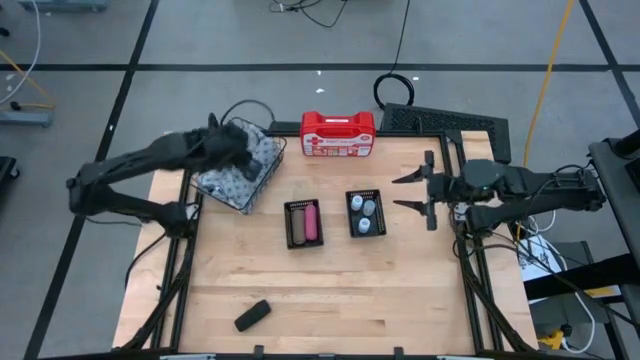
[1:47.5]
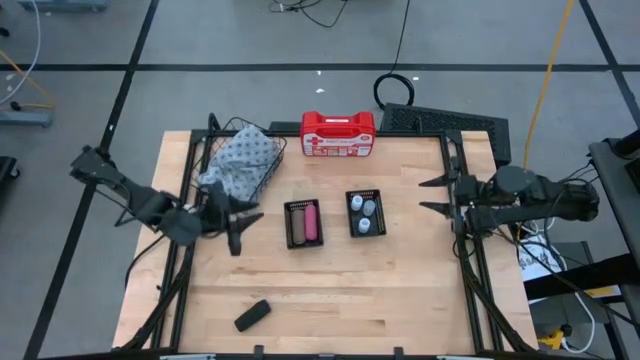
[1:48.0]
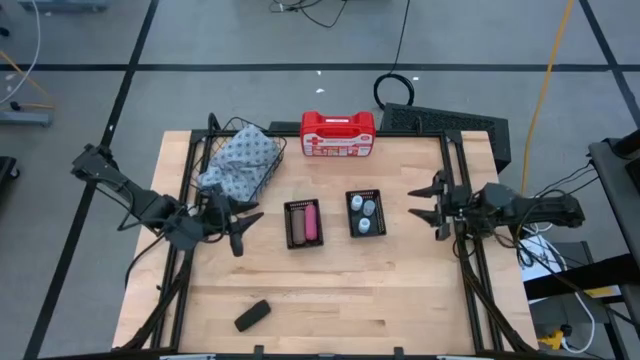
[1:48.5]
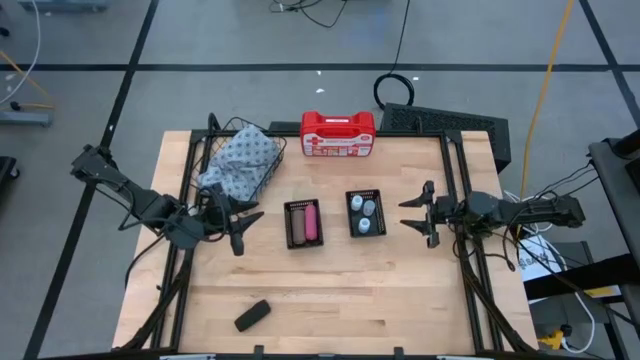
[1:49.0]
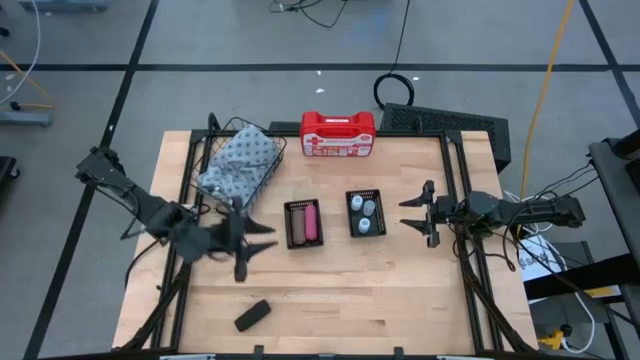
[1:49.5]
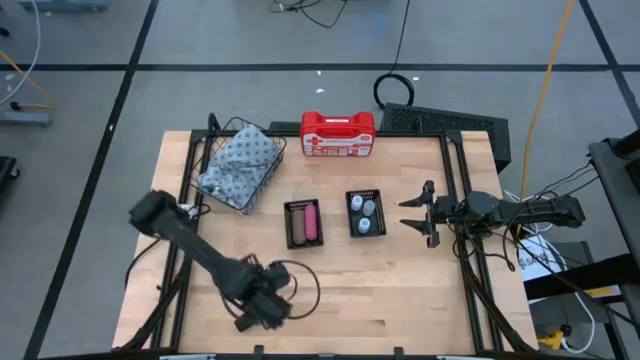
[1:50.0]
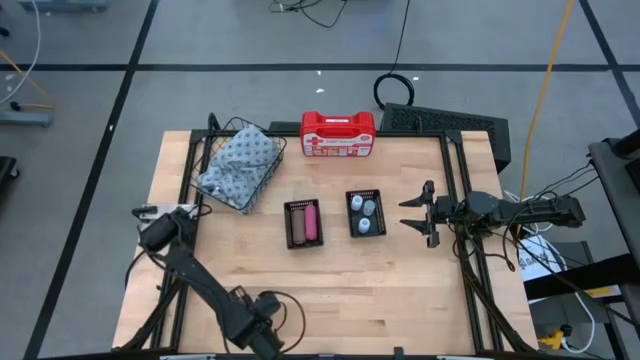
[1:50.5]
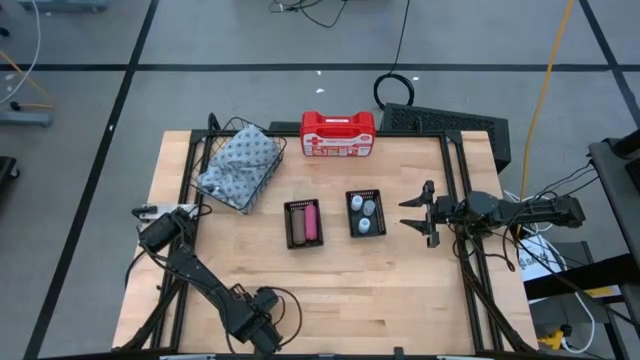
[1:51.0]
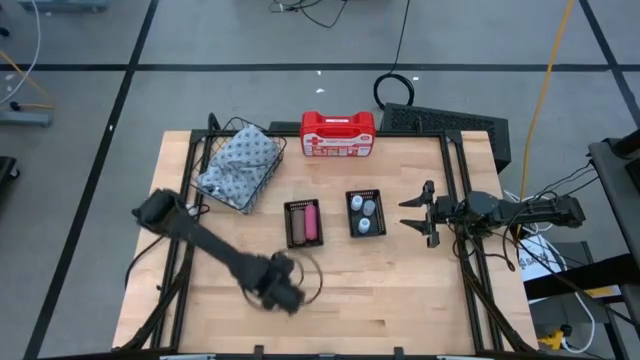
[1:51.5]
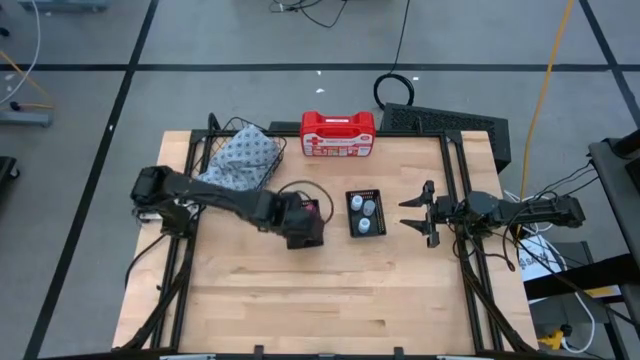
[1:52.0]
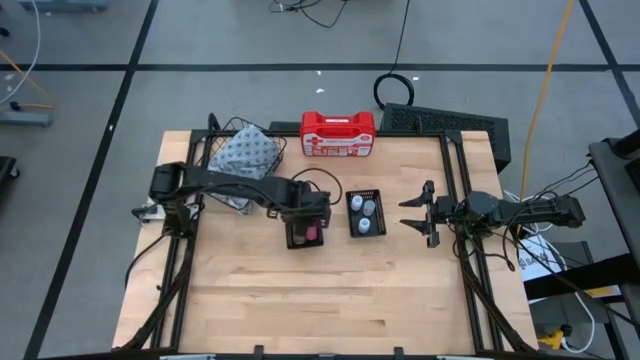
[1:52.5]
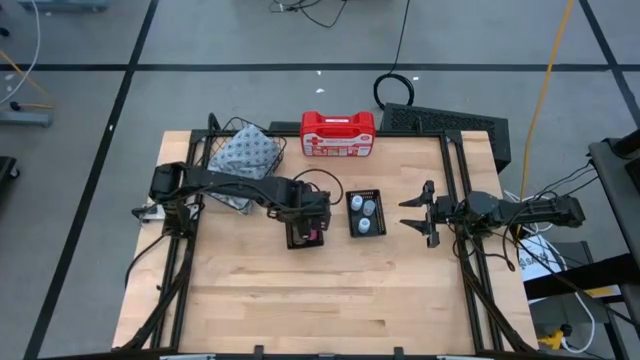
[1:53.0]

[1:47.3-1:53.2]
Task: Pick & Place Medicine items
Put the black bandage into the left black basket

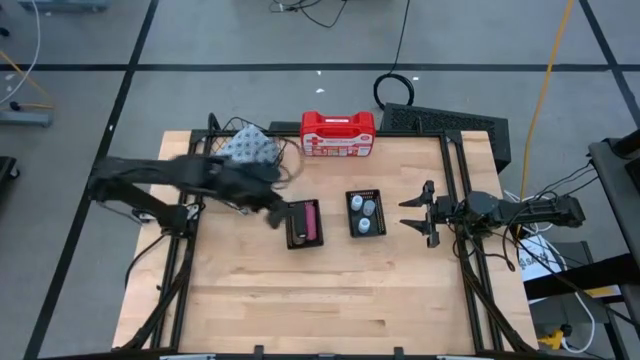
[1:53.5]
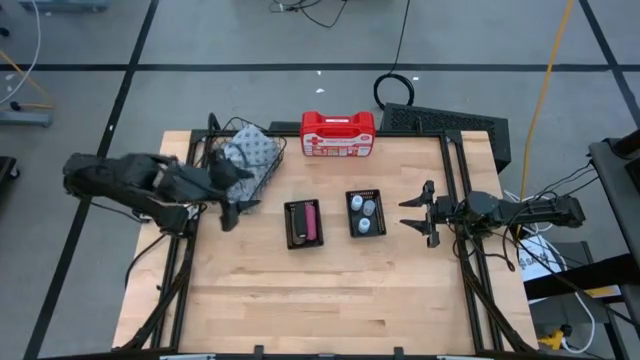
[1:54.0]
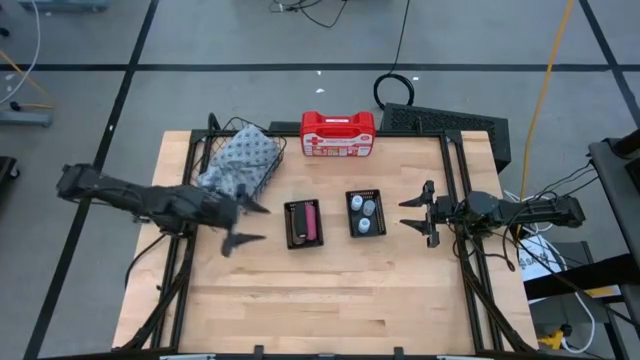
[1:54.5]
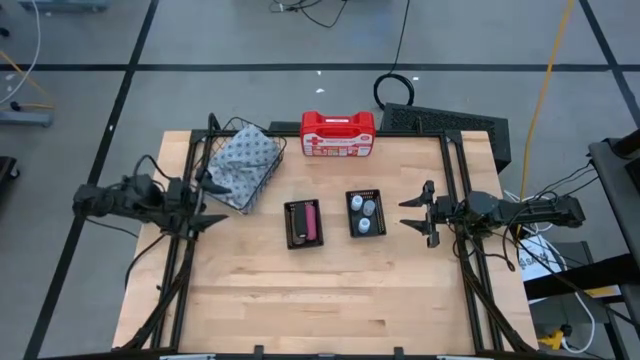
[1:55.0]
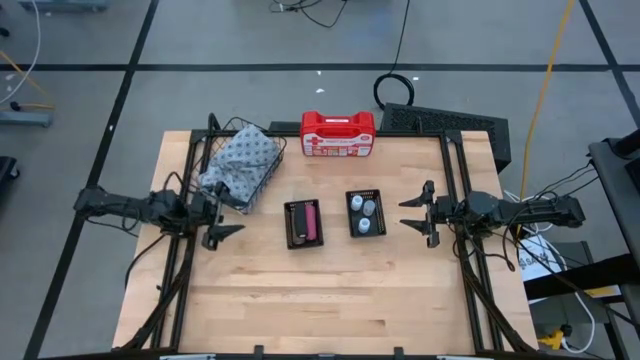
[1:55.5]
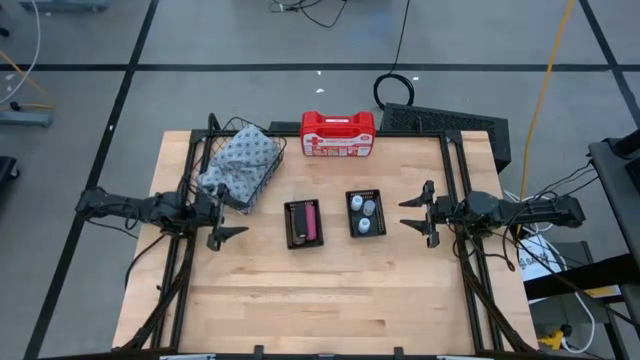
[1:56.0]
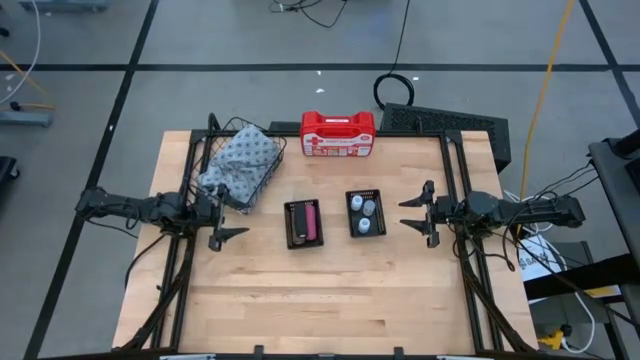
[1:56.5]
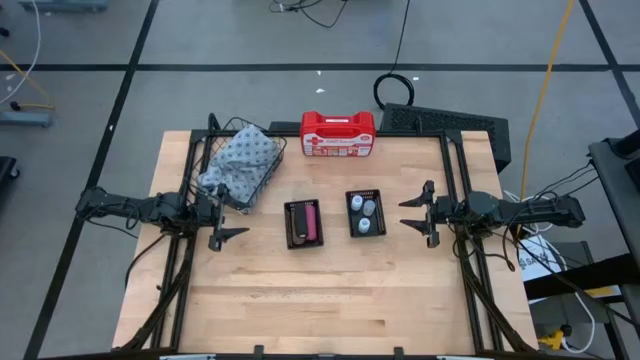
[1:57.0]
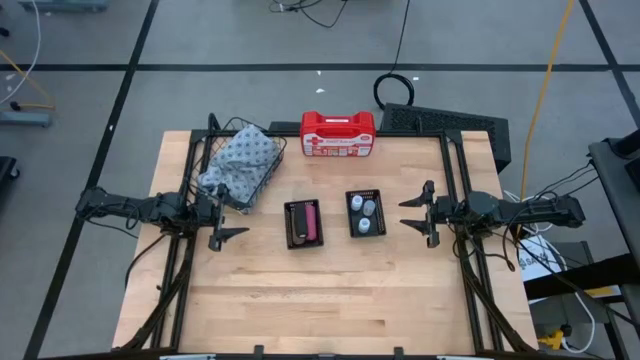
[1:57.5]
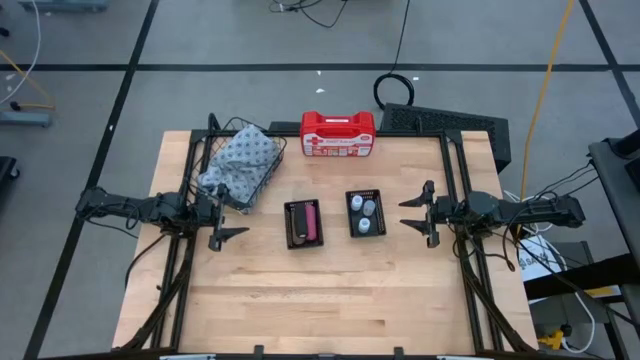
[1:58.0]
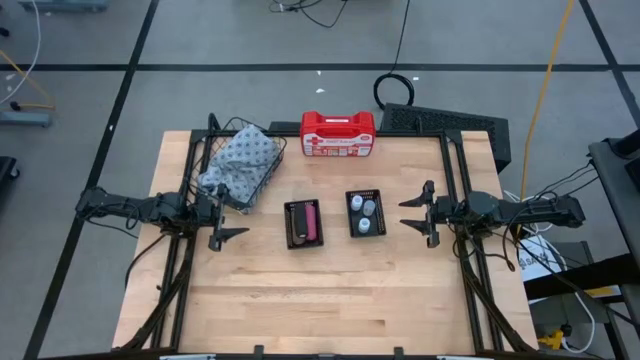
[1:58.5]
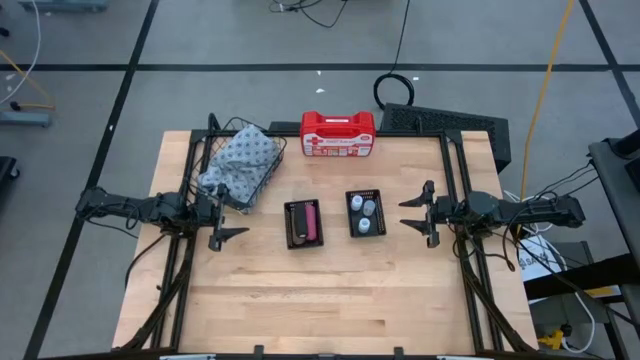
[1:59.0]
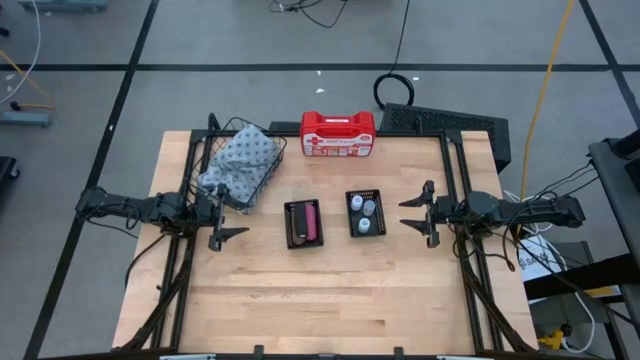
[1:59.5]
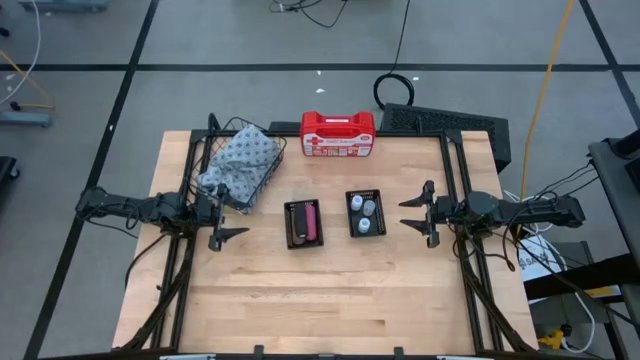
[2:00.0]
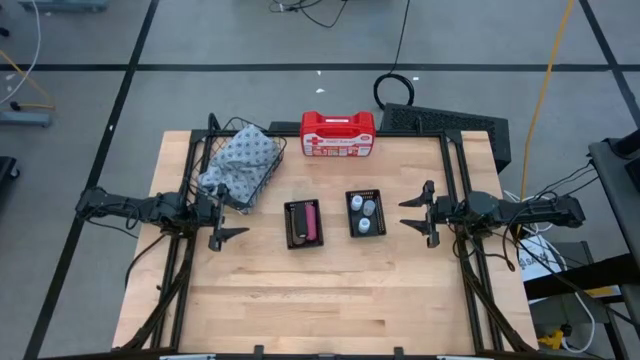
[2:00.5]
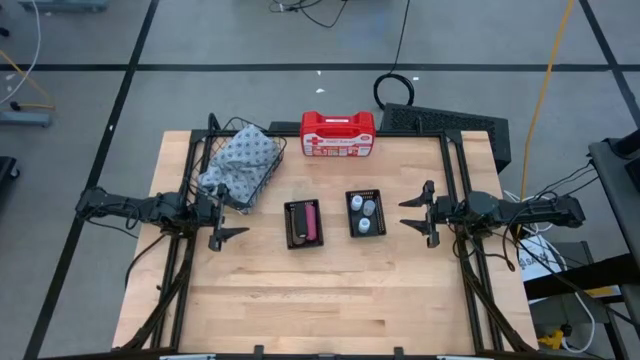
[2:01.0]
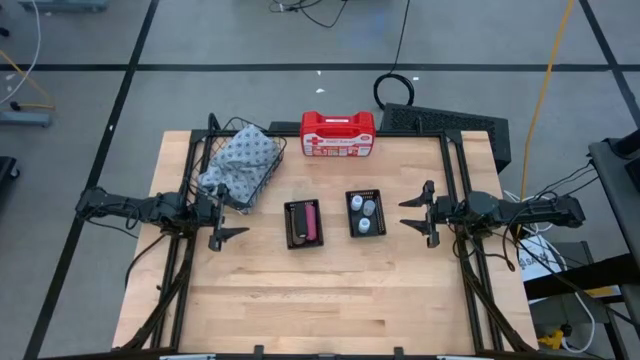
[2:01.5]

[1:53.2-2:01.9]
Return to Home Position

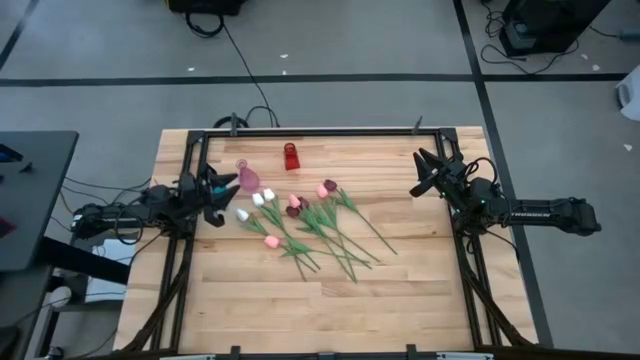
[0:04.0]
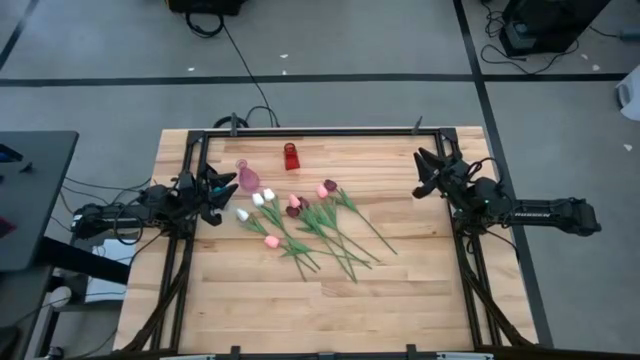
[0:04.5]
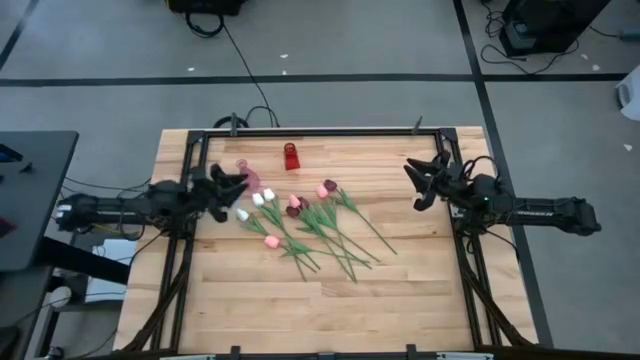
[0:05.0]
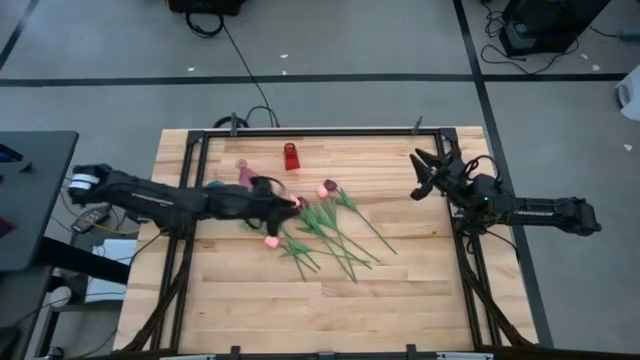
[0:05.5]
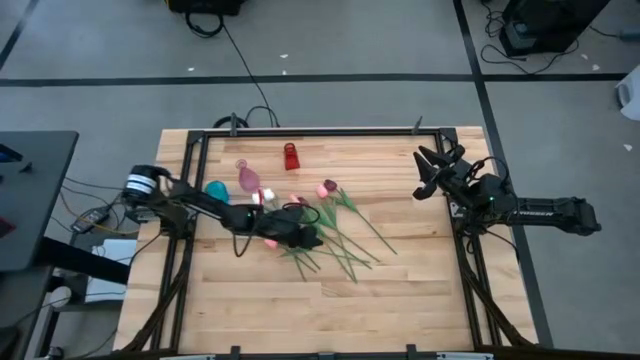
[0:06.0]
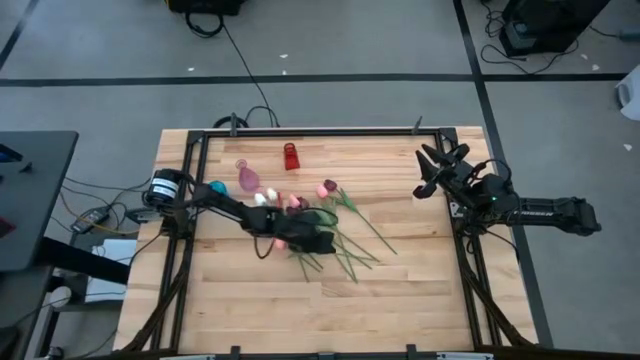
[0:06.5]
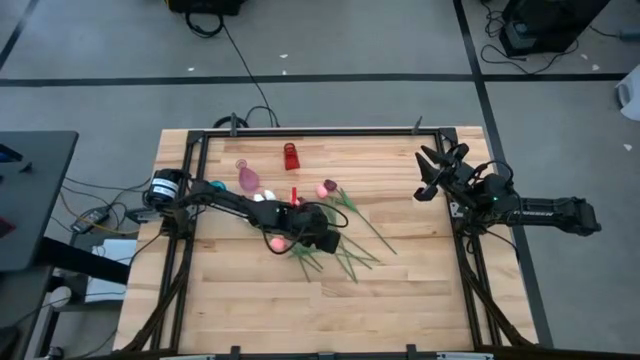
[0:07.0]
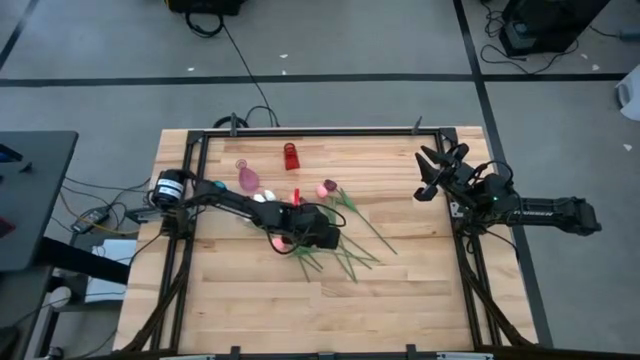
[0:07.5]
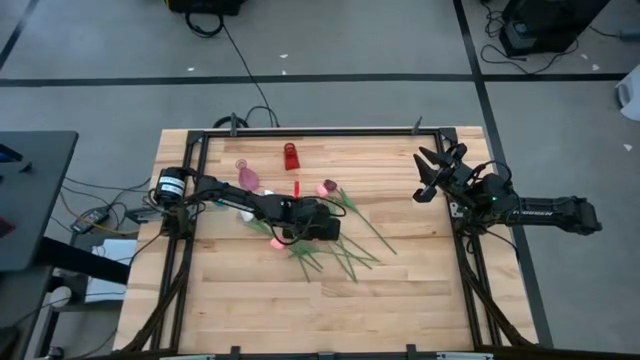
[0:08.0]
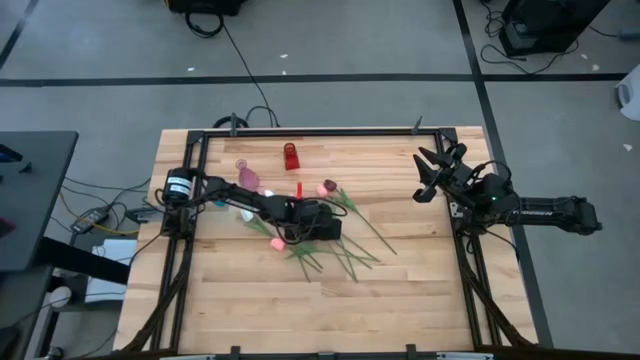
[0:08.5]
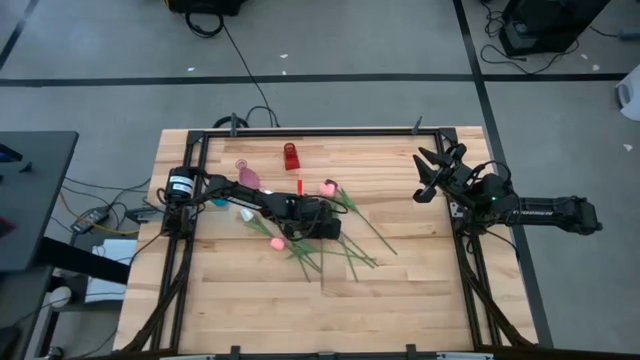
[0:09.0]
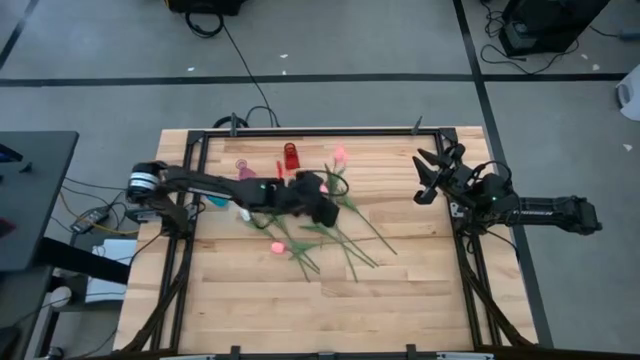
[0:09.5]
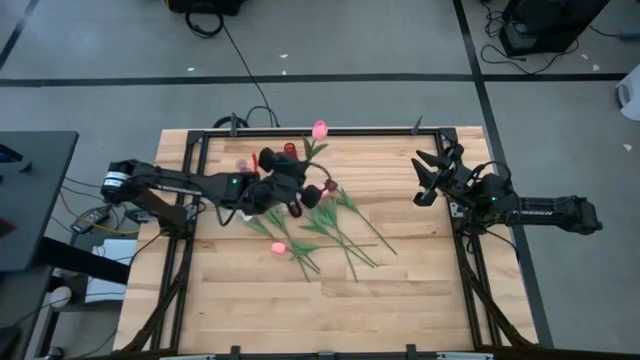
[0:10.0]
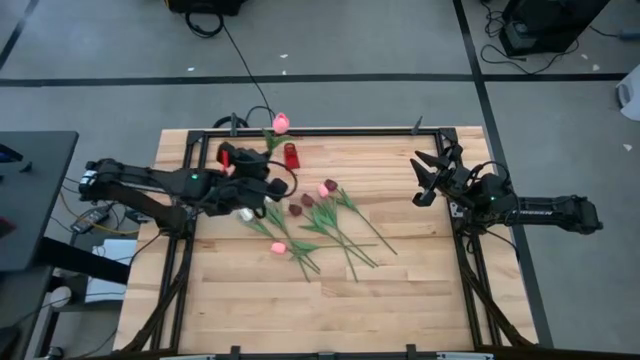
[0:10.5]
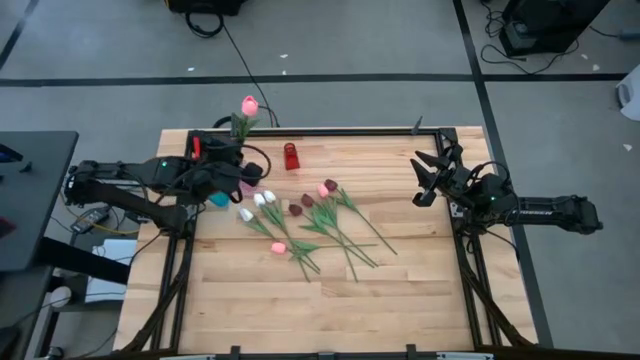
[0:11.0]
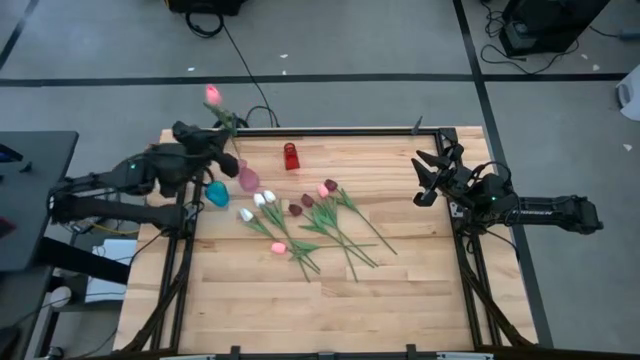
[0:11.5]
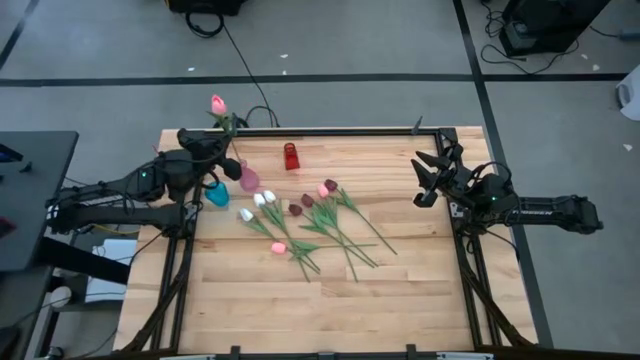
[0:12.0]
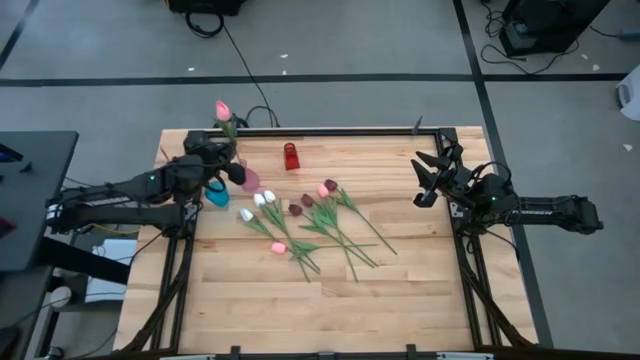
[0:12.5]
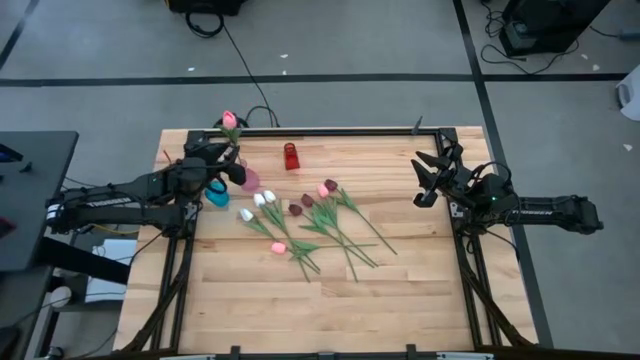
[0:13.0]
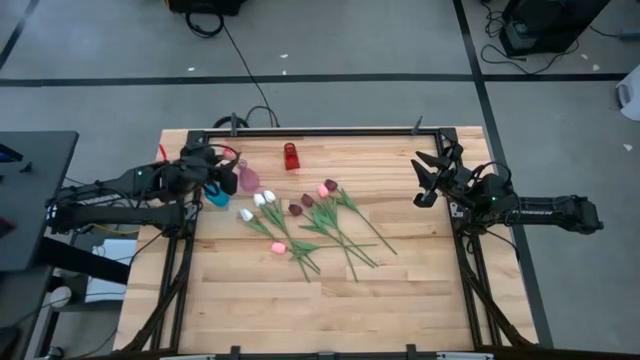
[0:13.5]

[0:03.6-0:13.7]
Task: Sort flowers into vase by color
Put the pink flower into the purple vase
